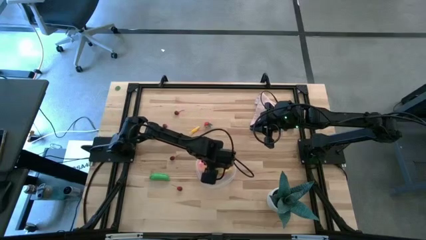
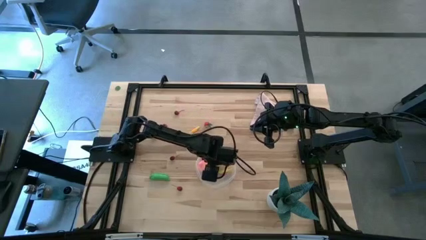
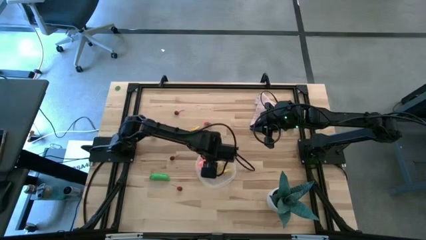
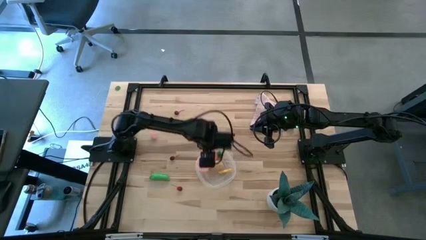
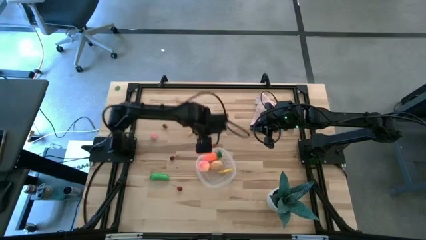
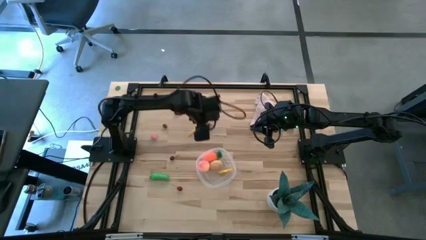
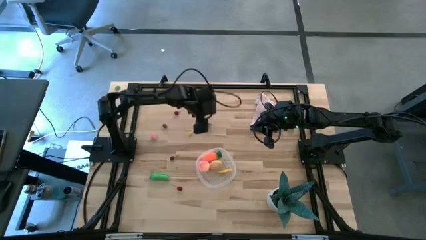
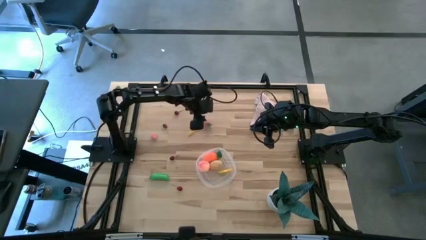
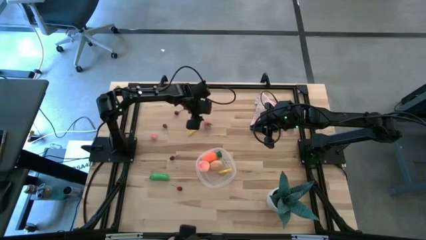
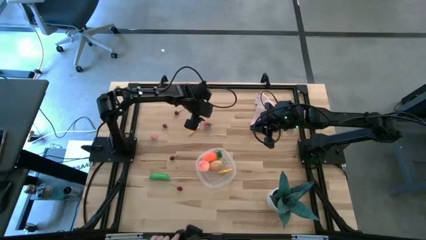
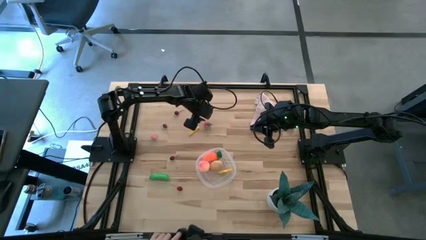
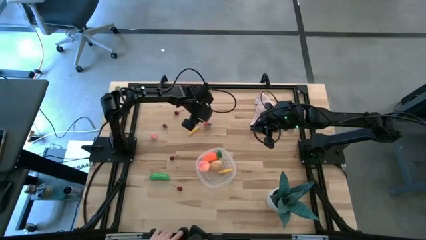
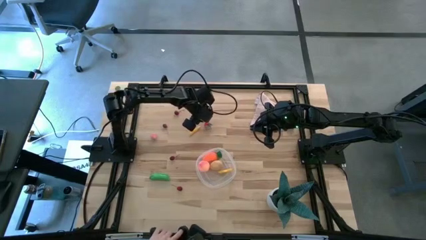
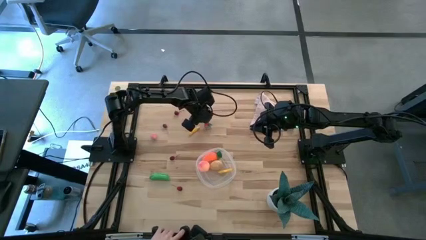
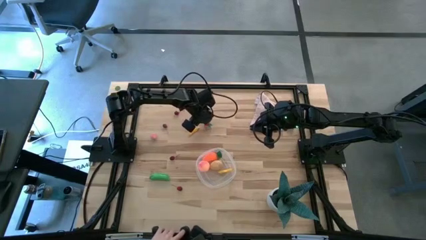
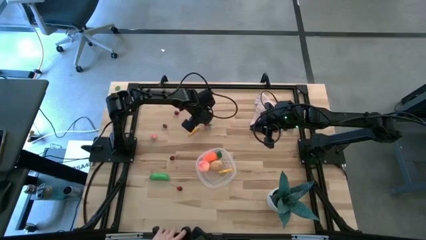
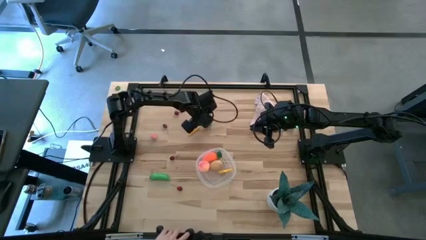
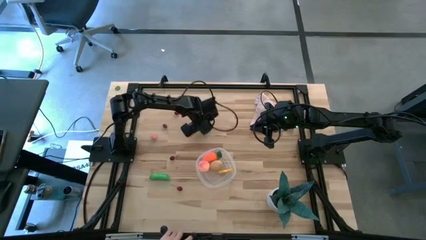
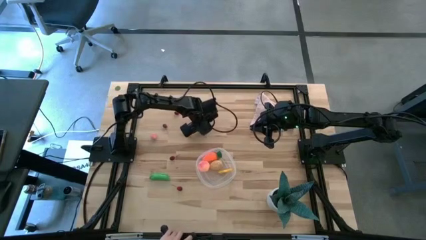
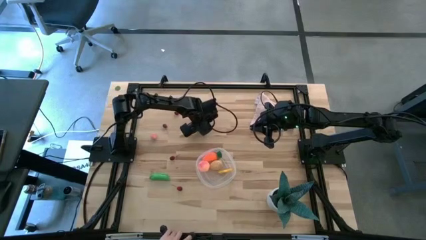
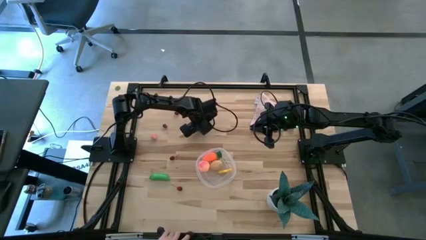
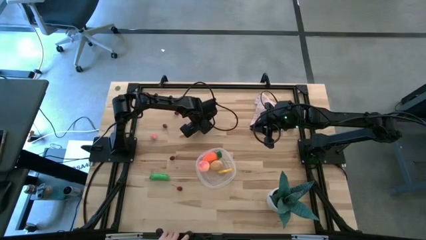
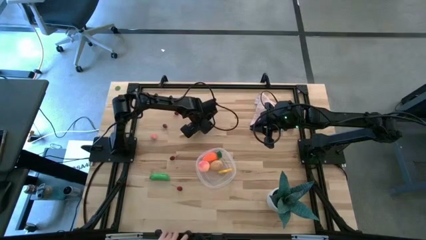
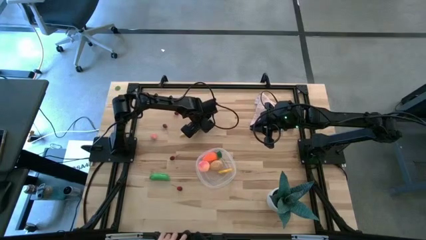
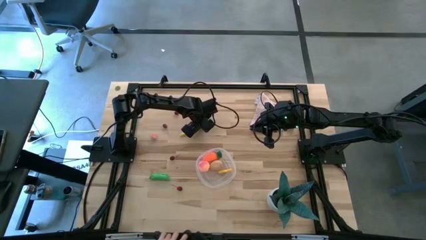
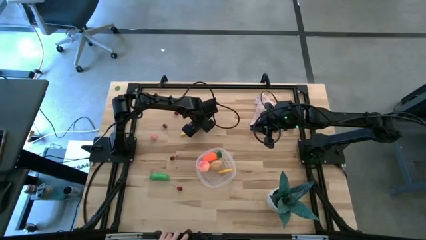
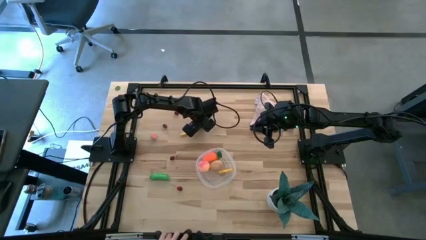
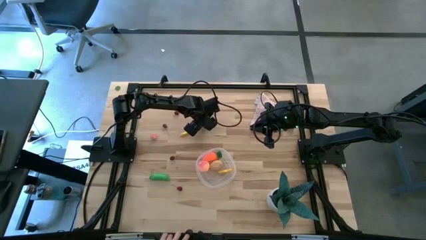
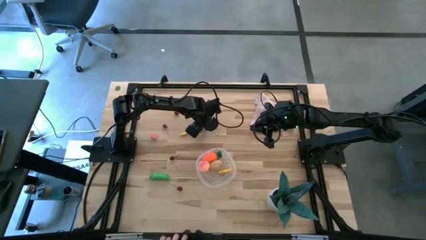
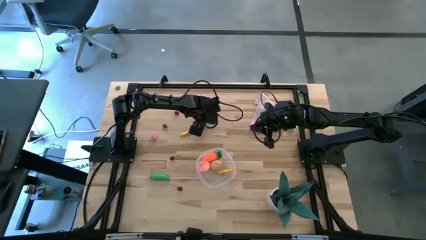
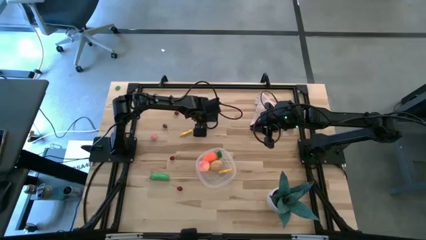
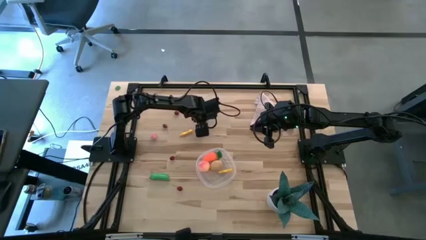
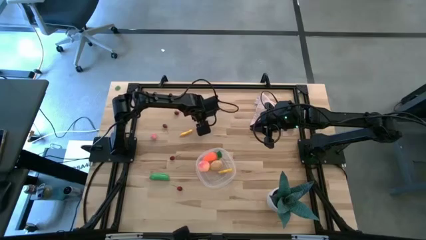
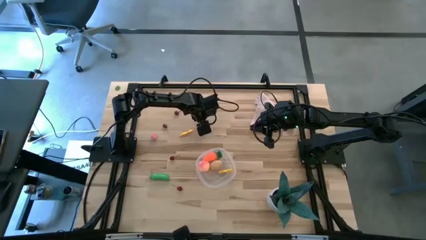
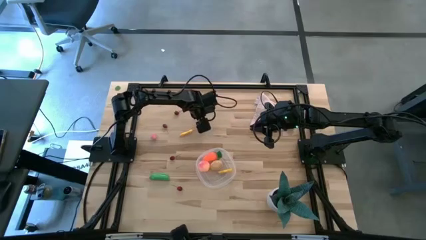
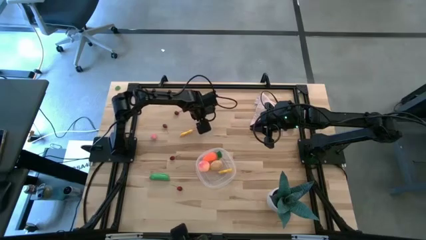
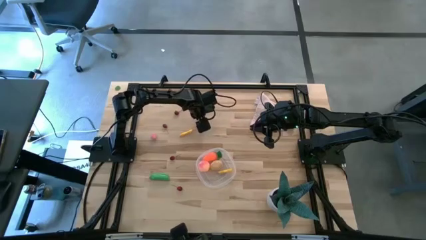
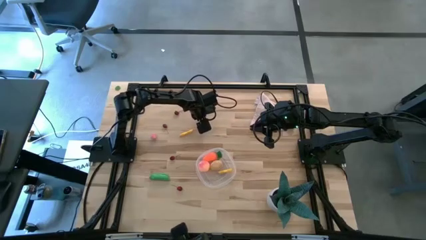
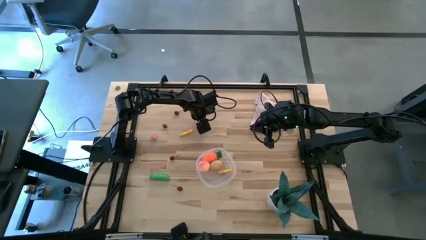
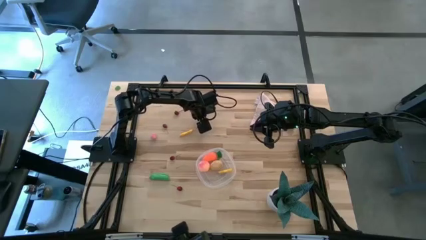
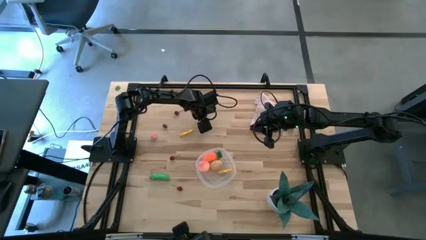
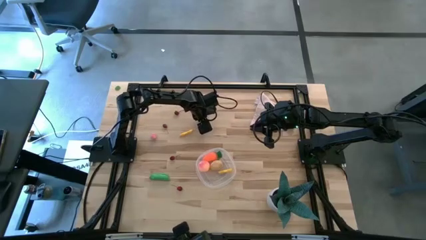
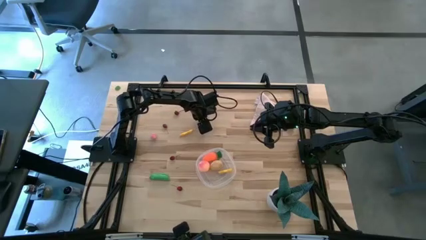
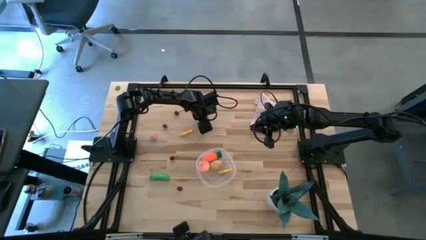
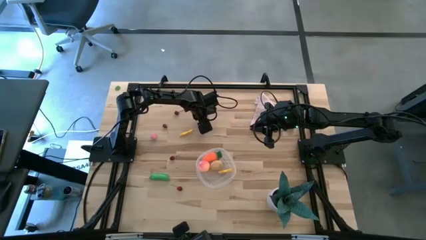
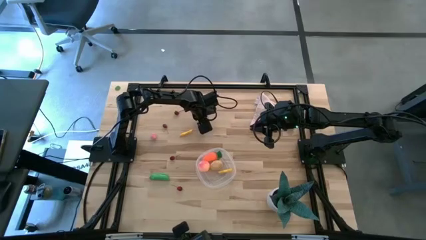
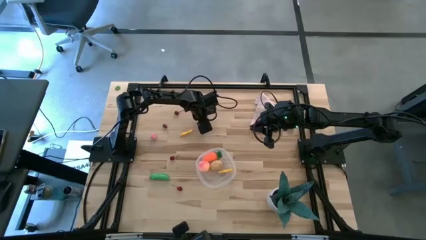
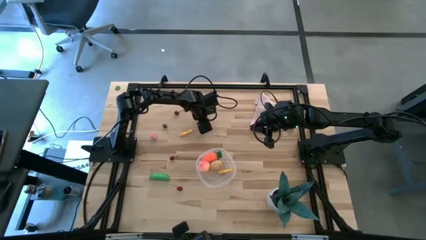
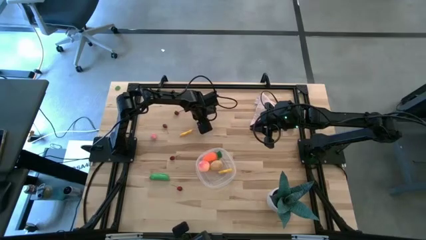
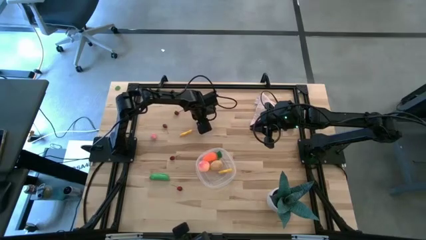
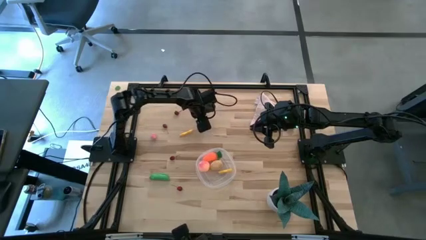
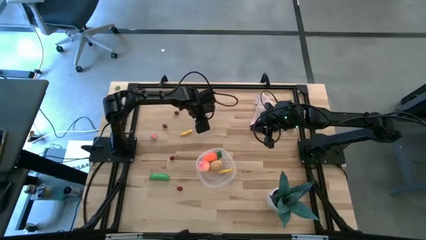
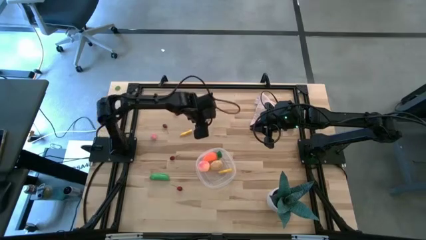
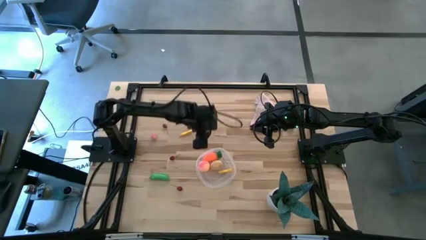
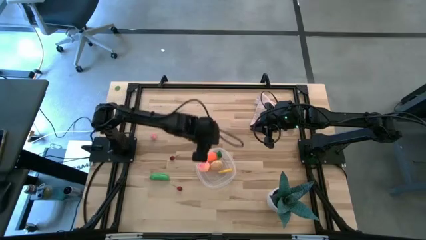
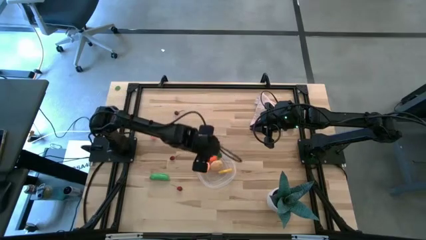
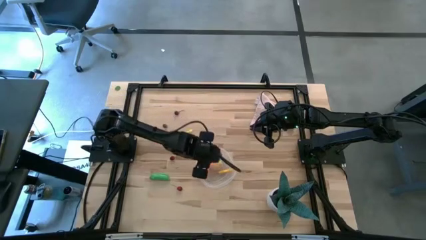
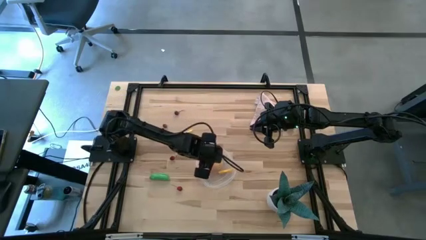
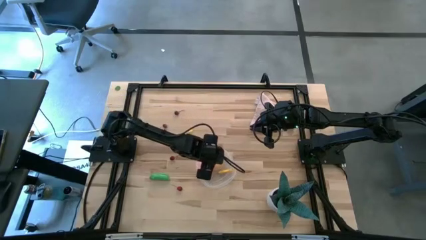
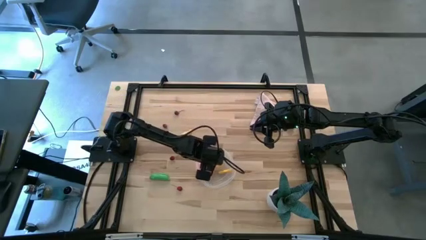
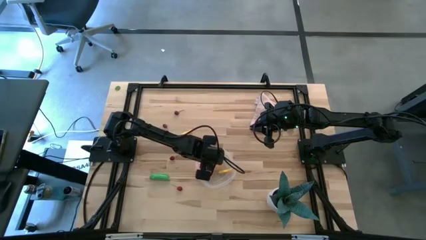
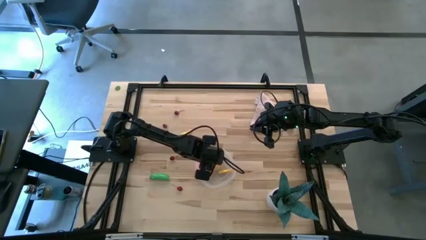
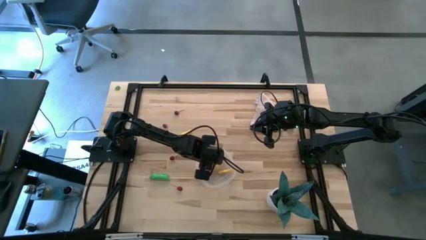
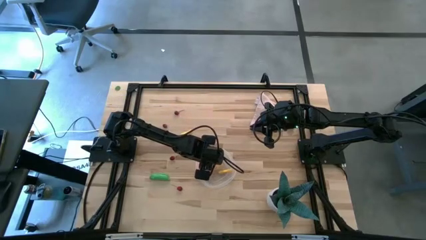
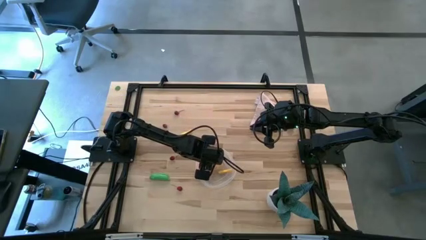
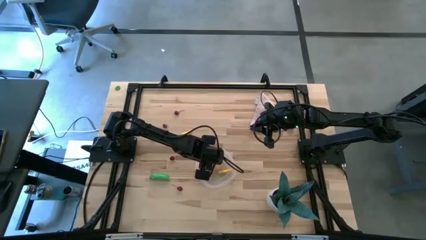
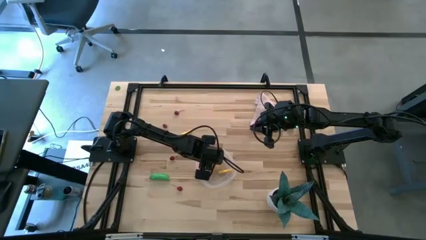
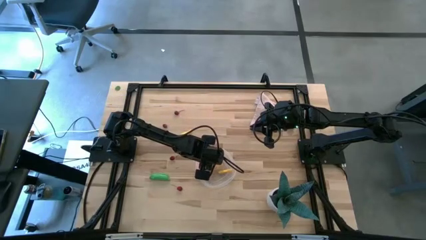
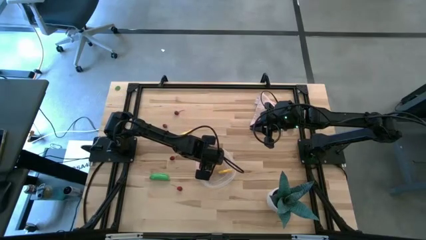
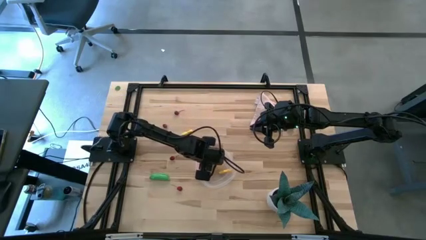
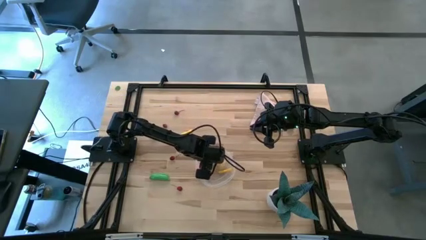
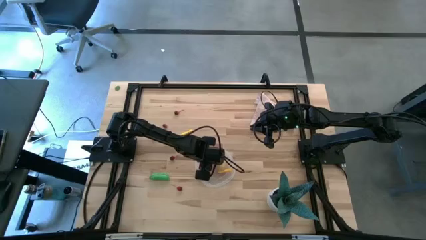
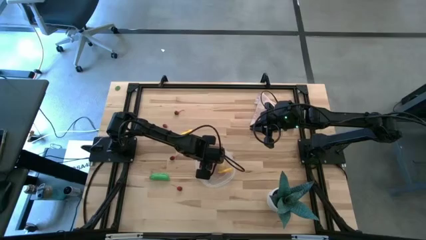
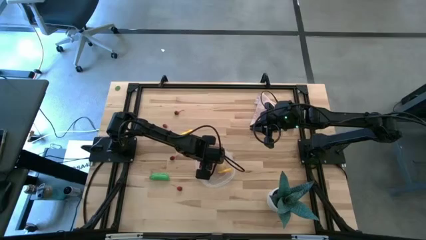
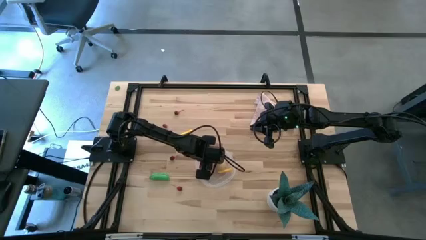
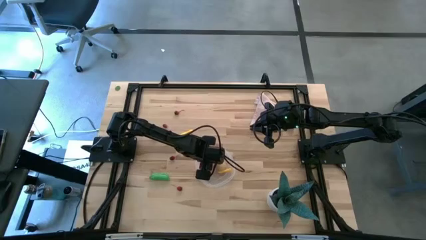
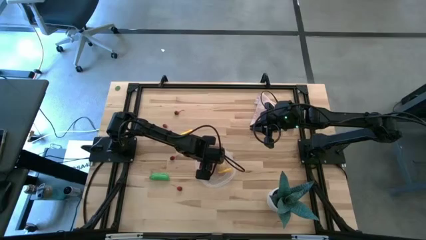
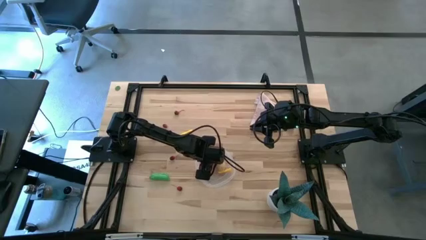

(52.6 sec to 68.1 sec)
Task: Pick and placing Produce into tupperware
Put the strawberry into the transparent bin
